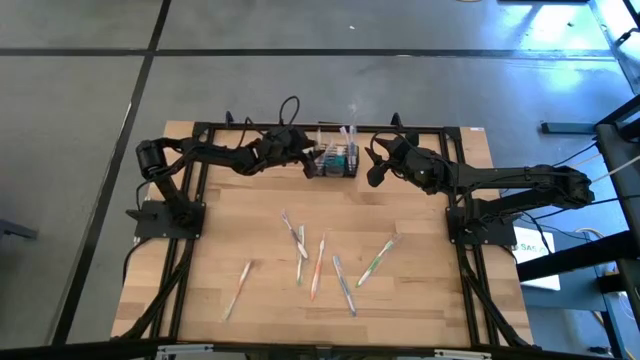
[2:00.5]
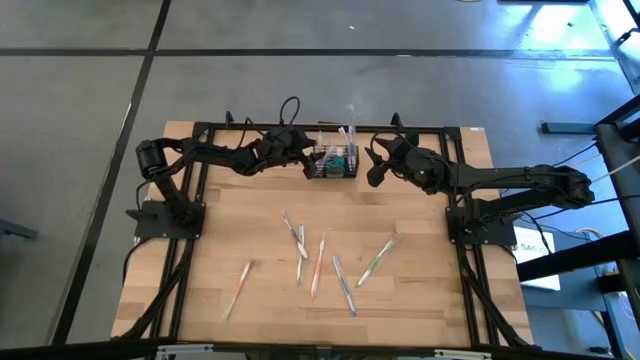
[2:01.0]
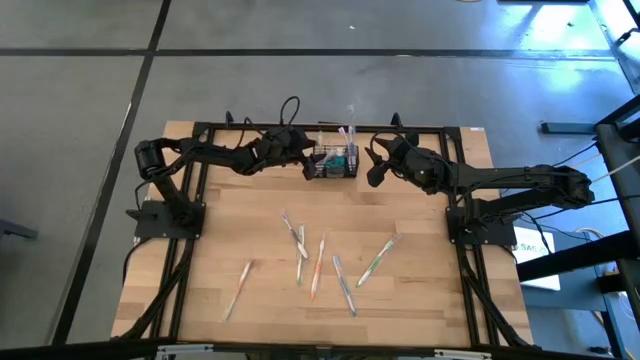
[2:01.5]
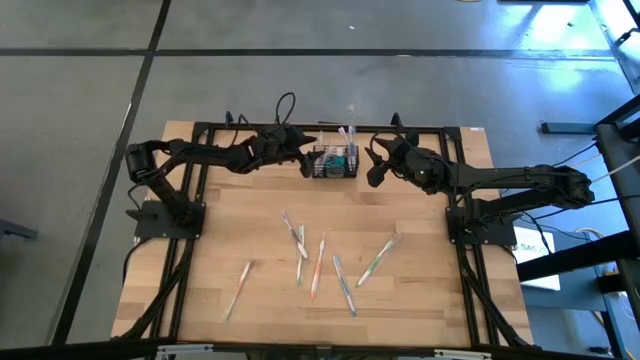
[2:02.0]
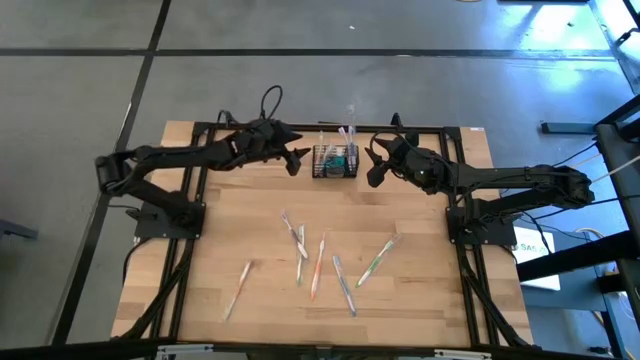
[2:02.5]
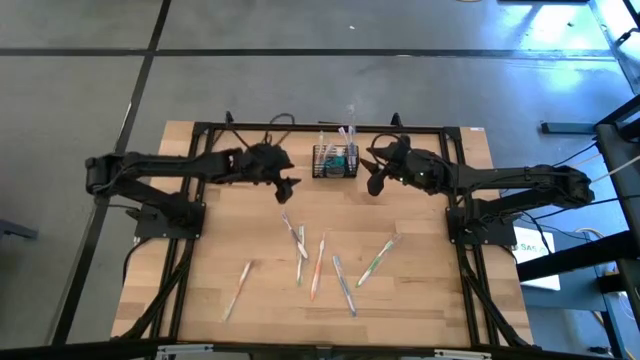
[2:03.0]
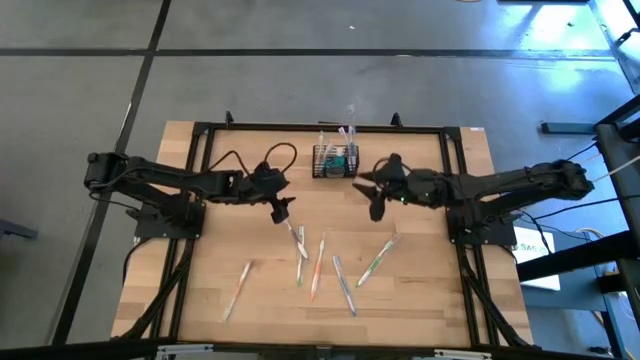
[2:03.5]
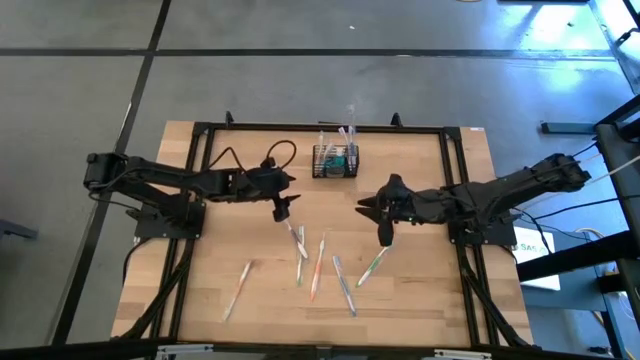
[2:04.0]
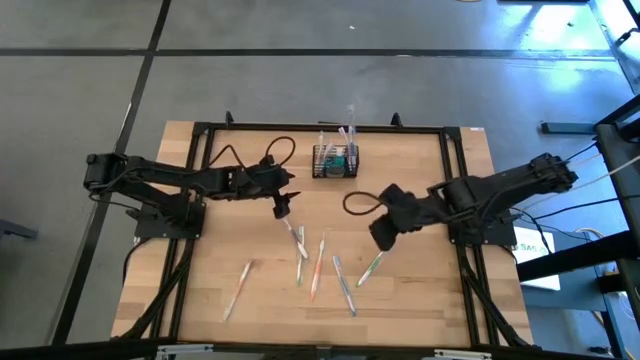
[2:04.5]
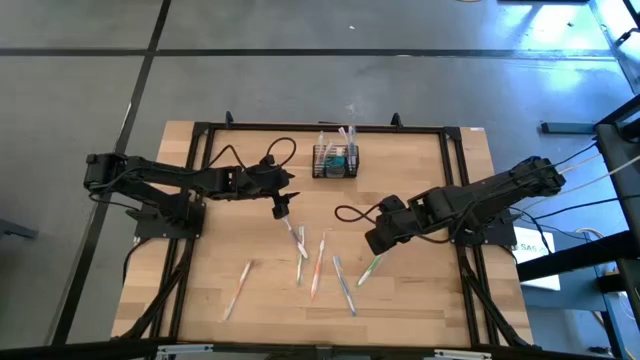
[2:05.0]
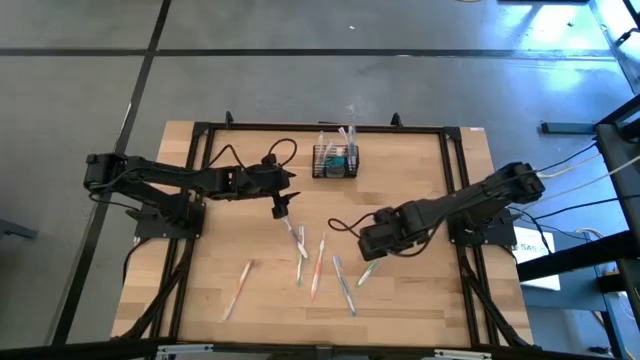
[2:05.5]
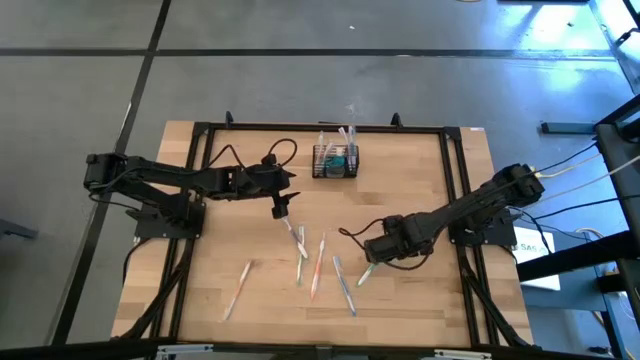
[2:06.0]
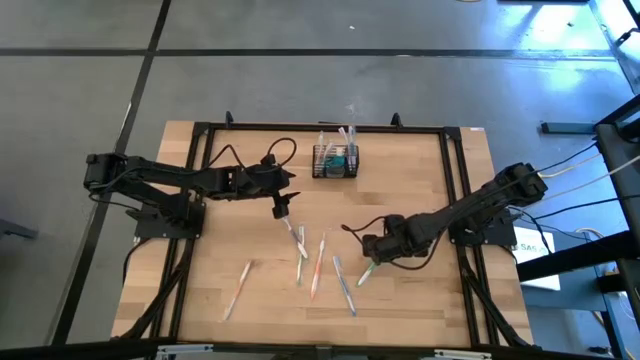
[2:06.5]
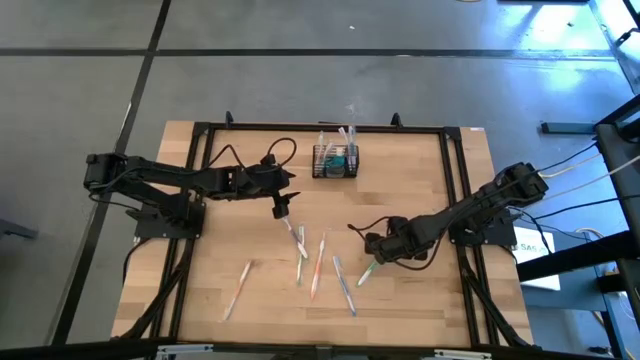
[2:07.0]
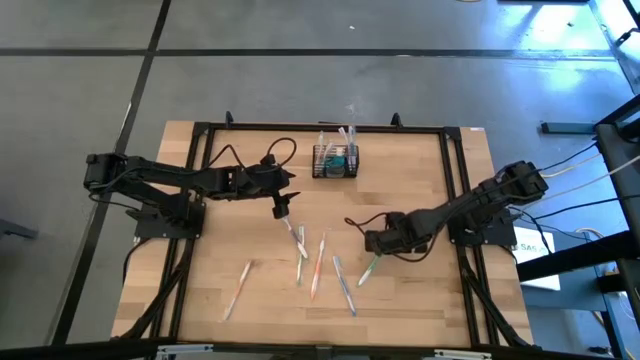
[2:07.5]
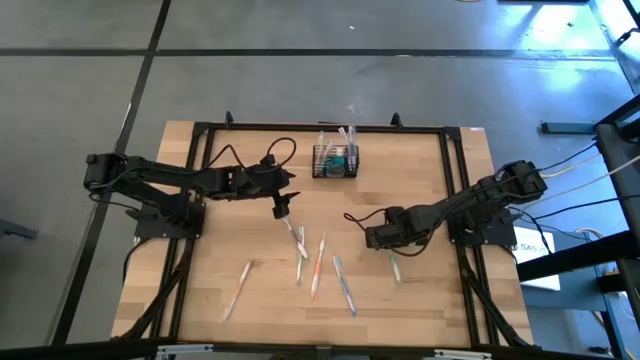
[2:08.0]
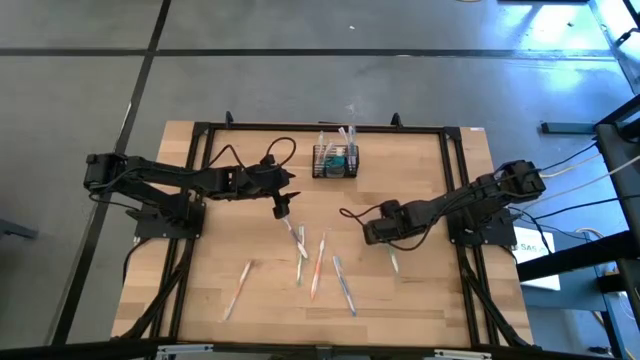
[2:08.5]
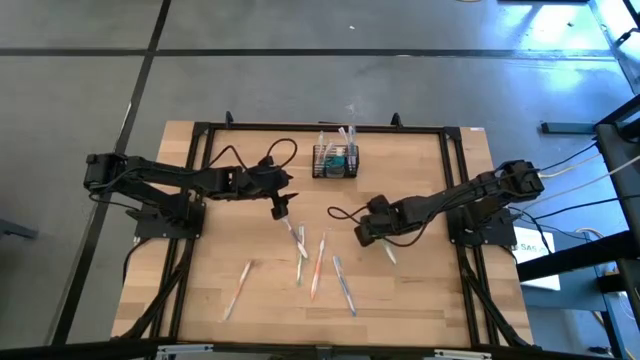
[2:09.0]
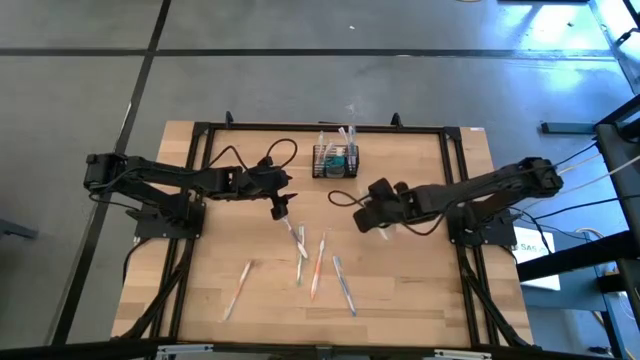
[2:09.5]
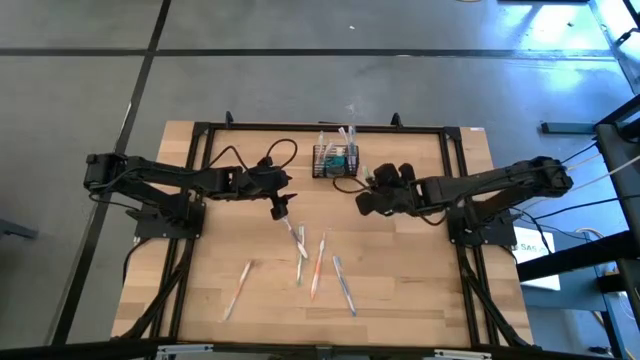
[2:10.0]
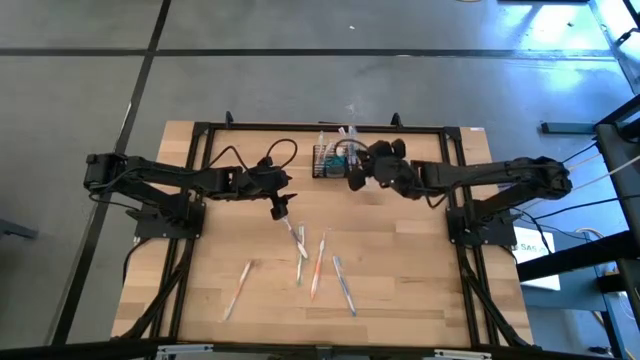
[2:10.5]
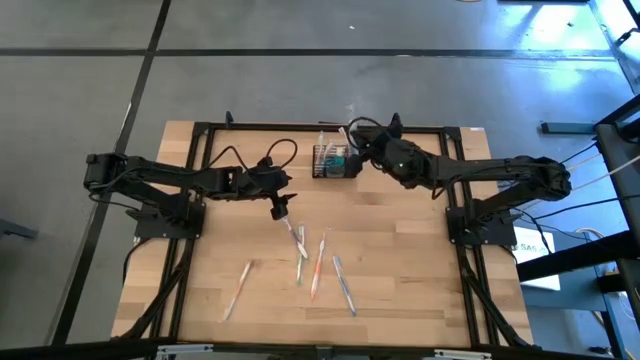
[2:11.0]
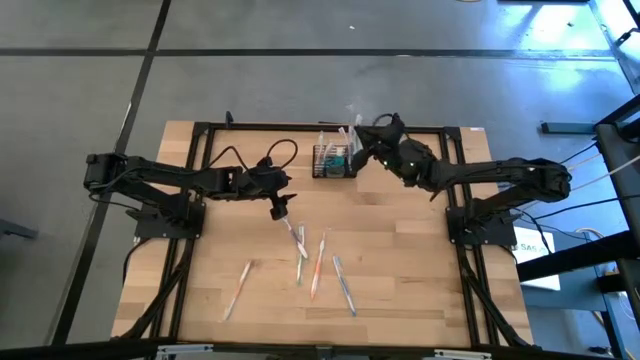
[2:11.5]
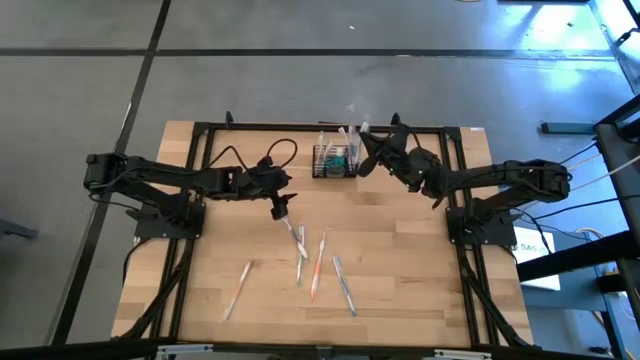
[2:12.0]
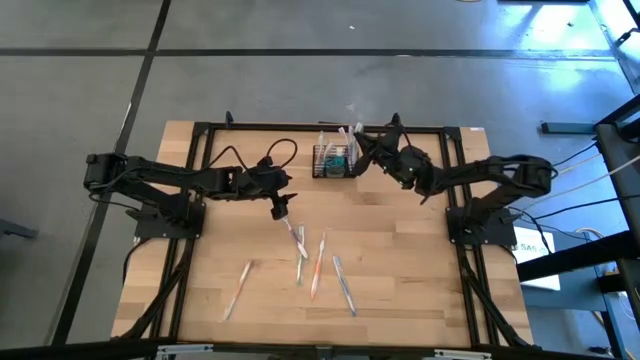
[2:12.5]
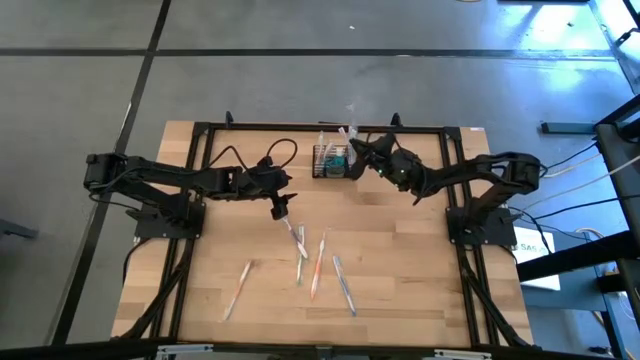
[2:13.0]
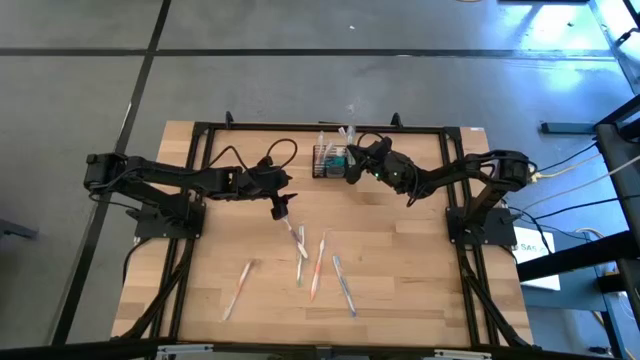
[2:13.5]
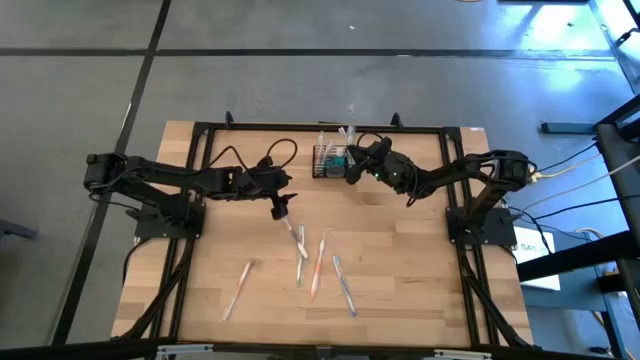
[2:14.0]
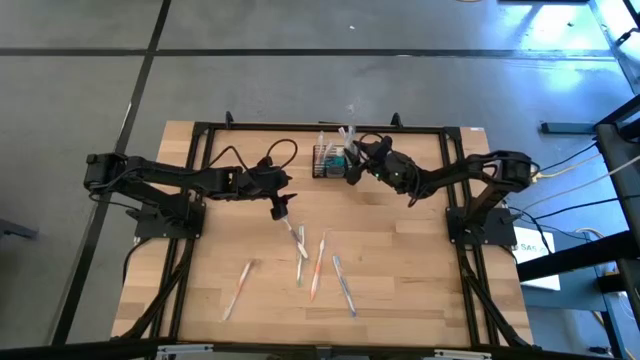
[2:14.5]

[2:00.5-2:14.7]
Task: Pick & Place toothbrushing station
Put the right green toothbrush in the right section of the wire organizer

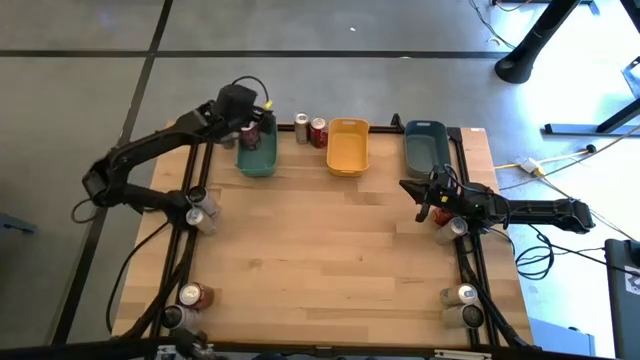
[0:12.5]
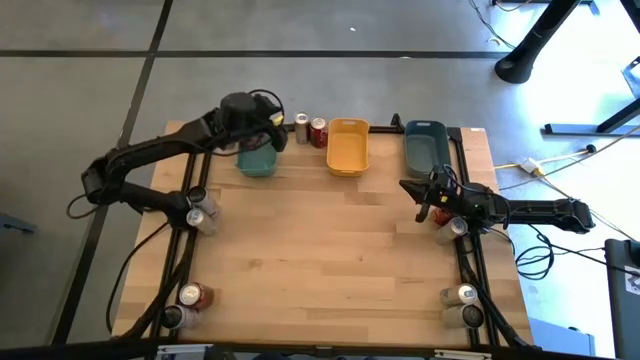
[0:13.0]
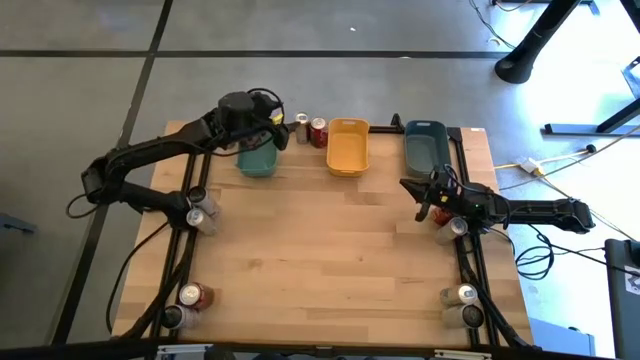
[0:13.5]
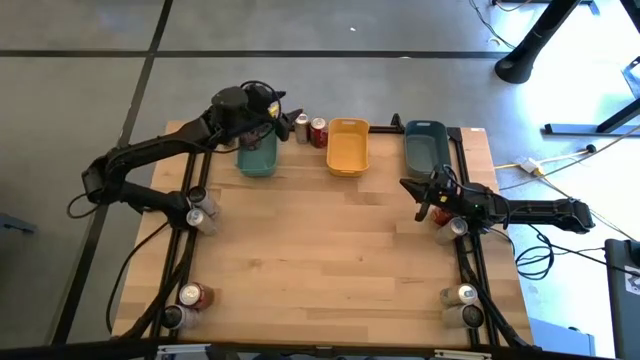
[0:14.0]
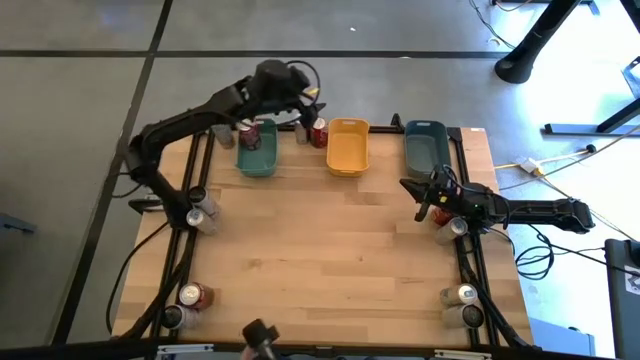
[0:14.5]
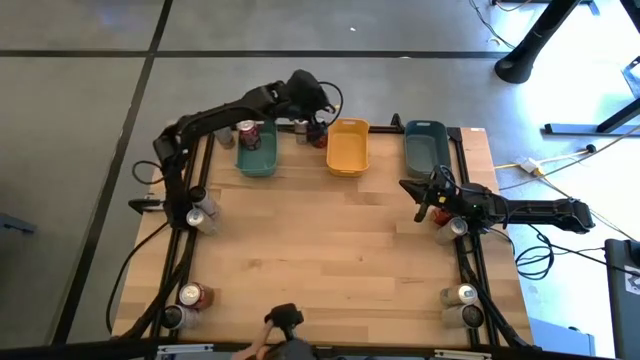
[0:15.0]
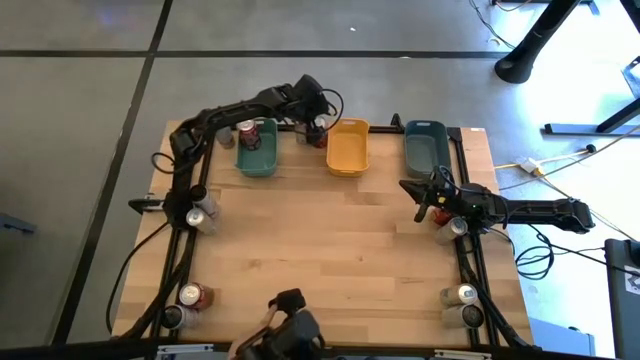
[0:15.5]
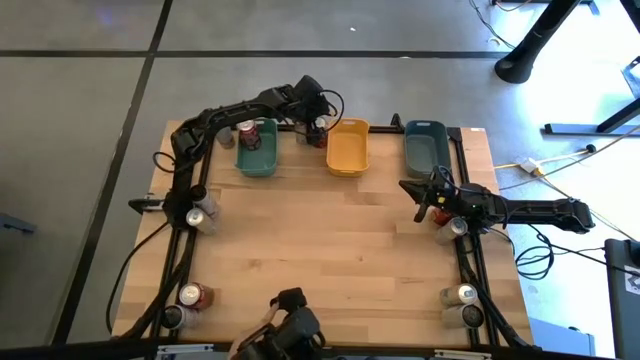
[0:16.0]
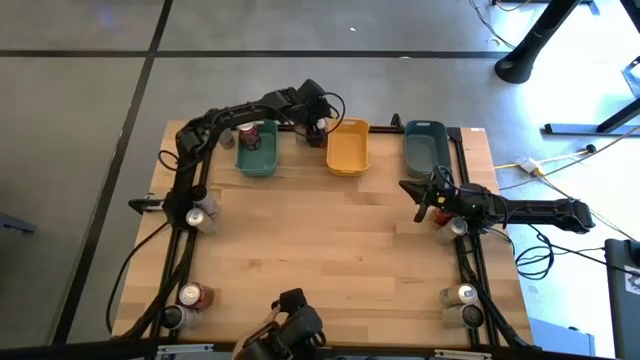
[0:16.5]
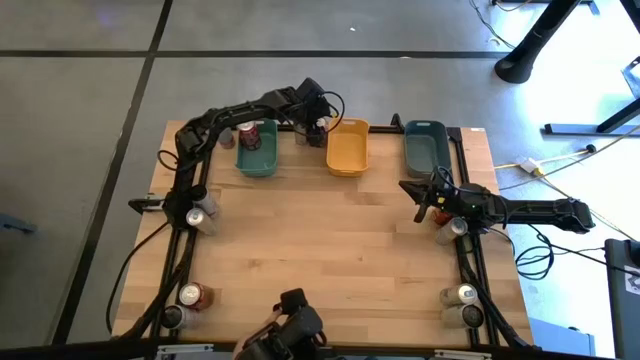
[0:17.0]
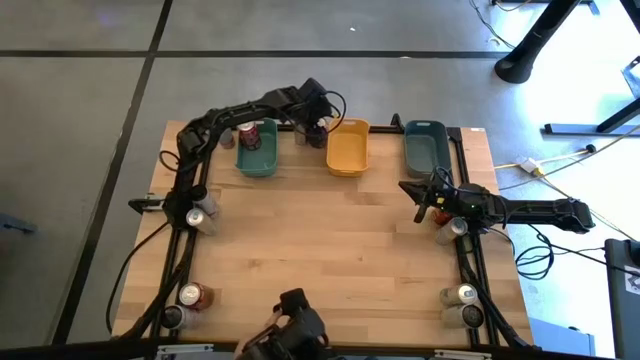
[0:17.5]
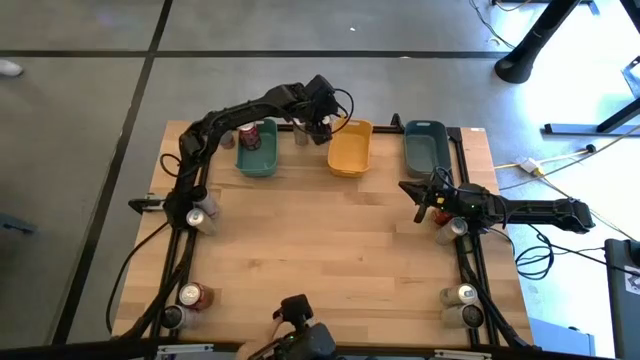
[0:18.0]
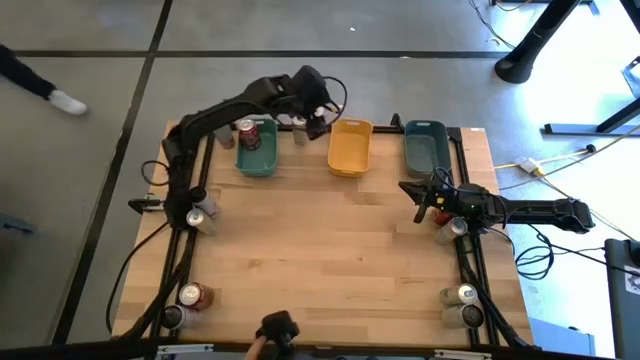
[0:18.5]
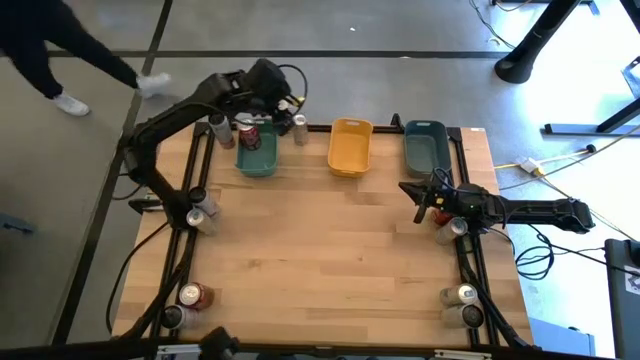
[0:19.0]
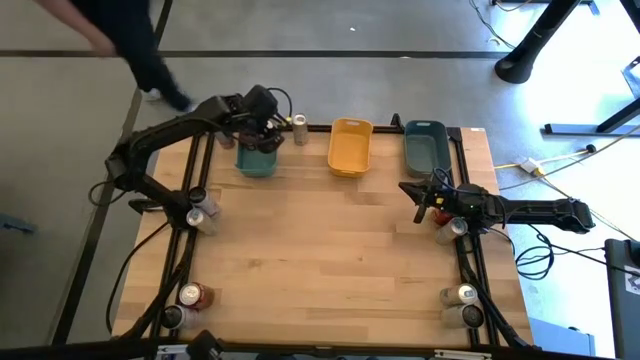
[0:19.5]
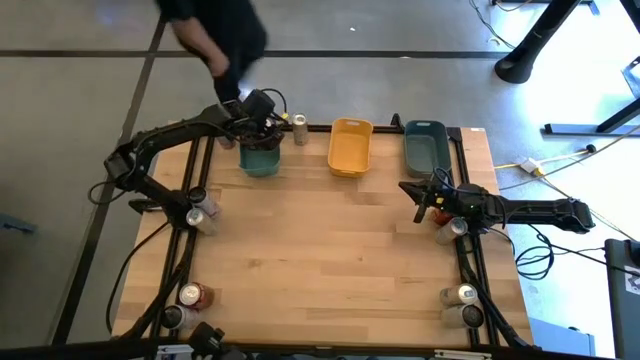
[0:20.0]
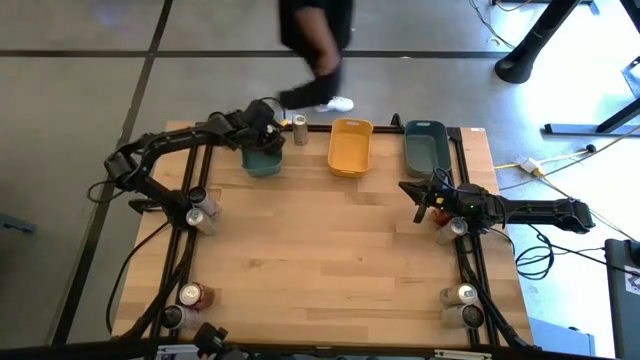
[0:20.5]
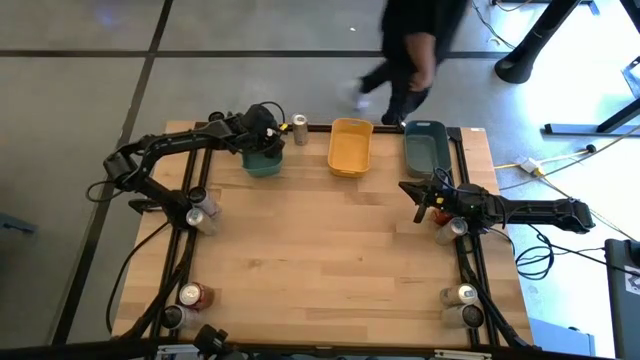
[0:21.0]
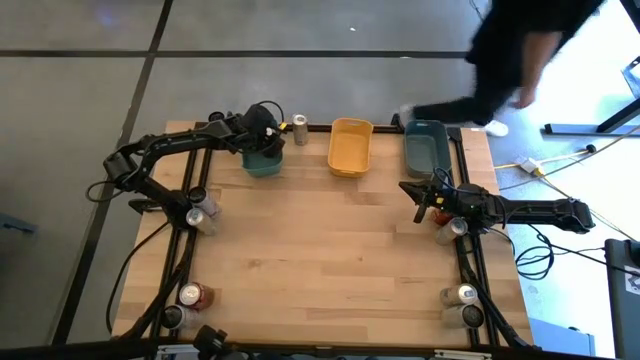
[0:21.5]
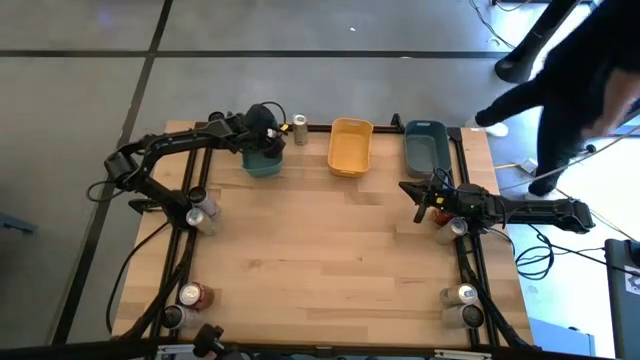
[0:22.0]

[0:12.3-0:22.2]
Task: Sort soda cans
Put the top red soda can into the green bin
